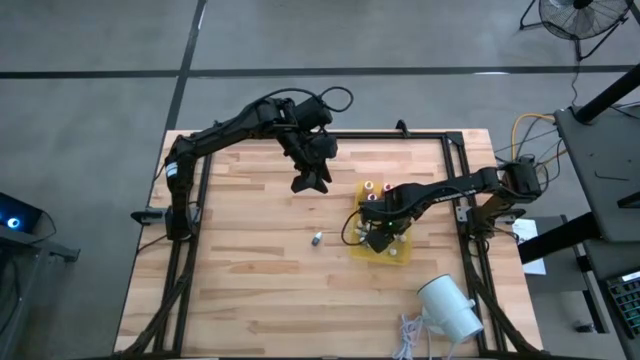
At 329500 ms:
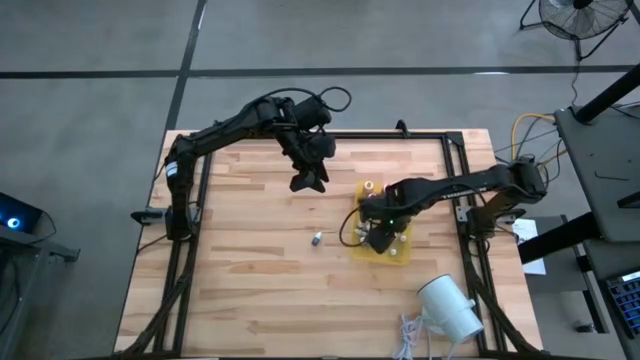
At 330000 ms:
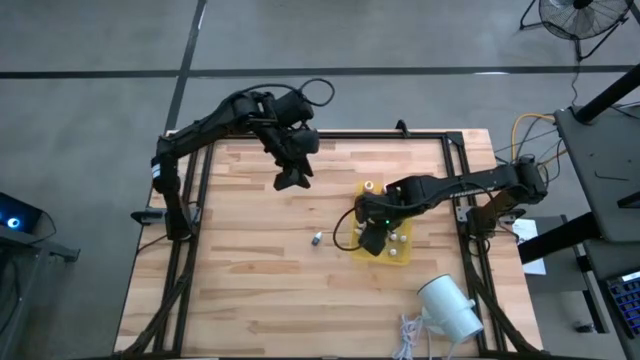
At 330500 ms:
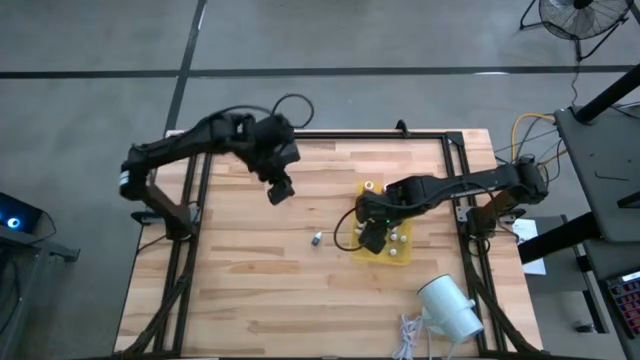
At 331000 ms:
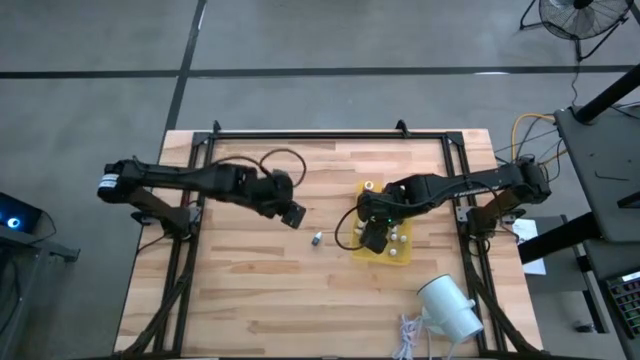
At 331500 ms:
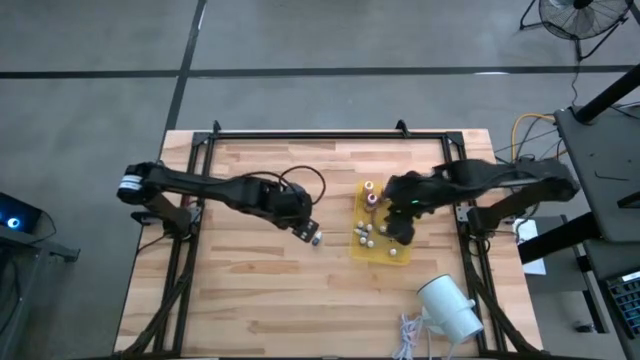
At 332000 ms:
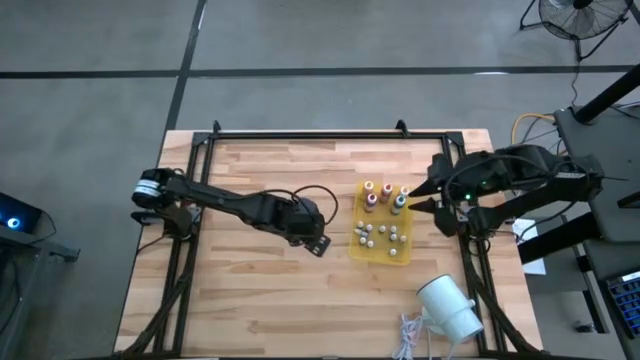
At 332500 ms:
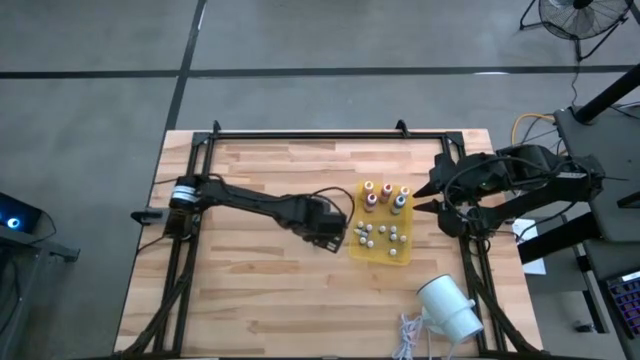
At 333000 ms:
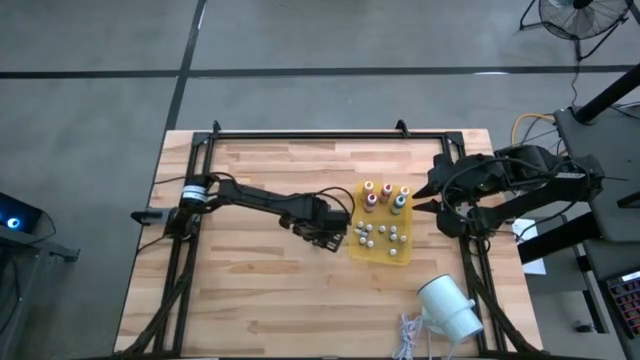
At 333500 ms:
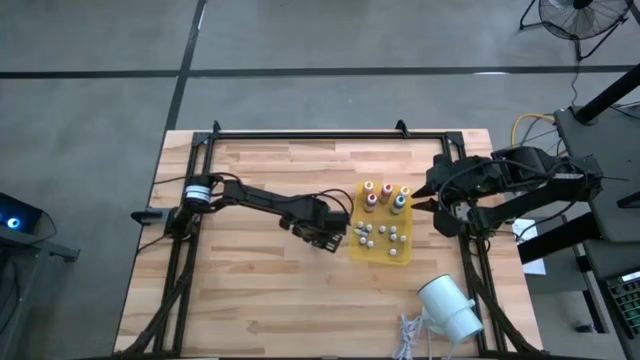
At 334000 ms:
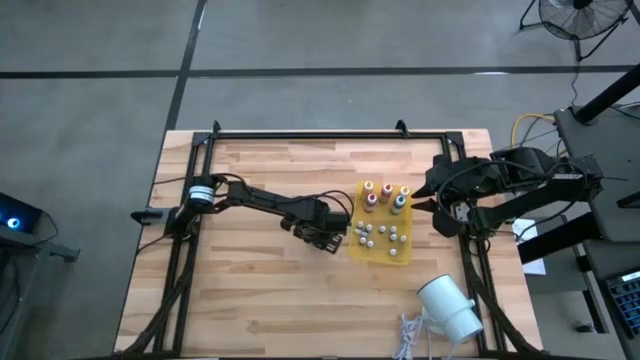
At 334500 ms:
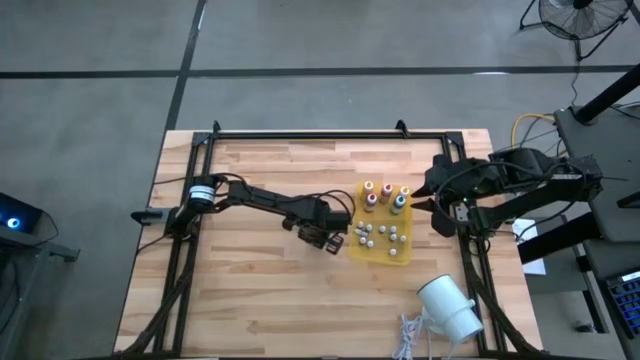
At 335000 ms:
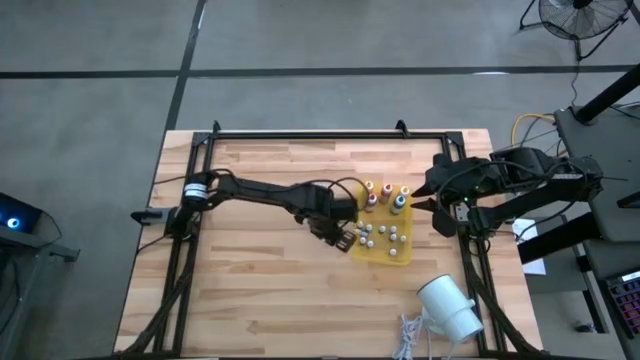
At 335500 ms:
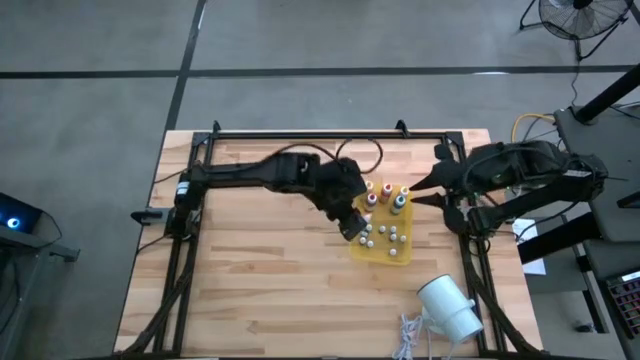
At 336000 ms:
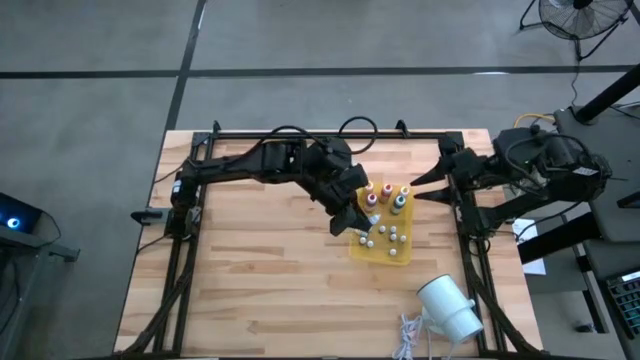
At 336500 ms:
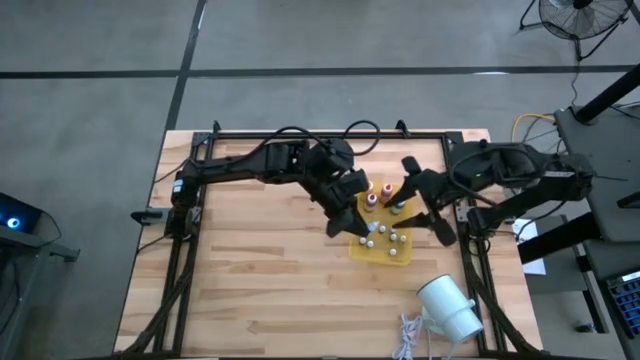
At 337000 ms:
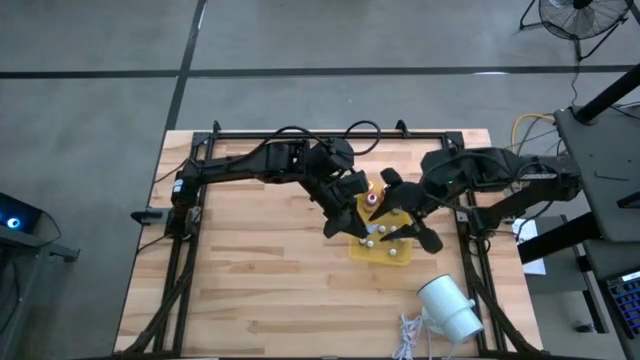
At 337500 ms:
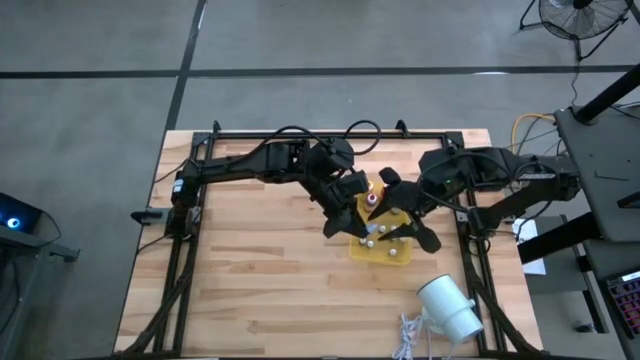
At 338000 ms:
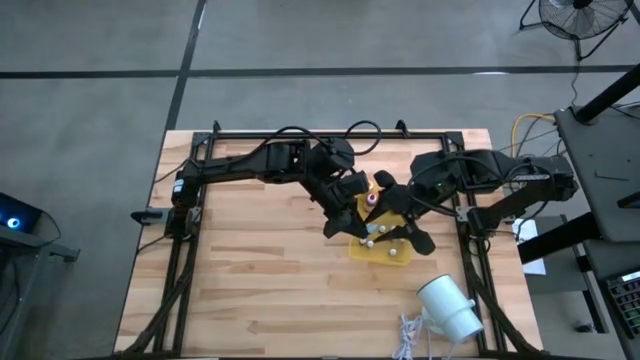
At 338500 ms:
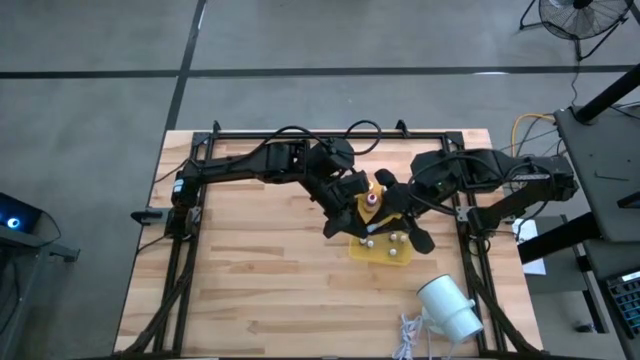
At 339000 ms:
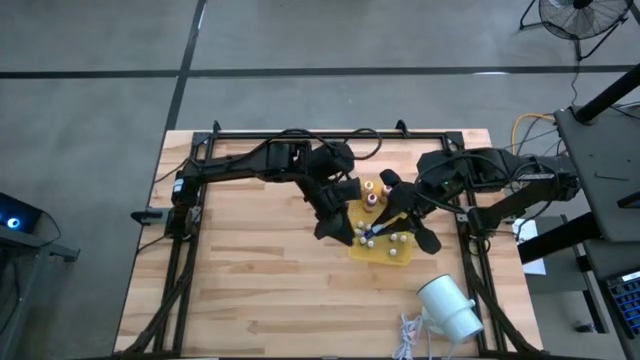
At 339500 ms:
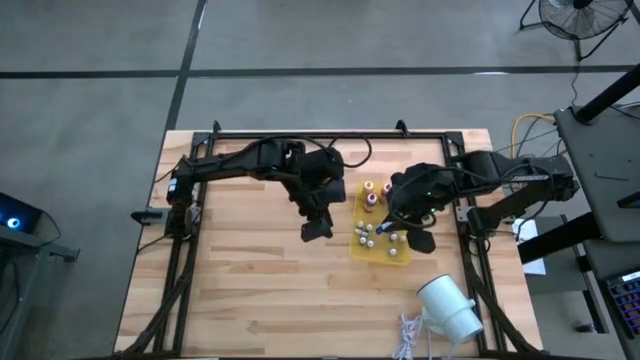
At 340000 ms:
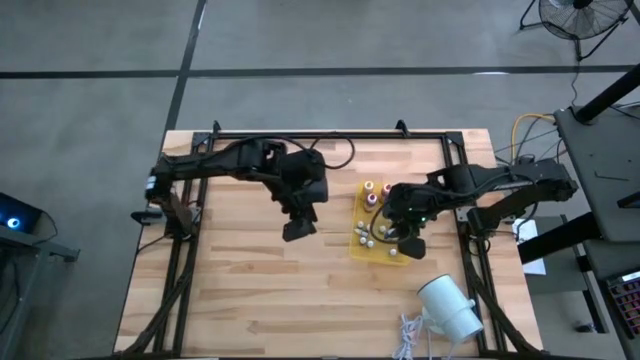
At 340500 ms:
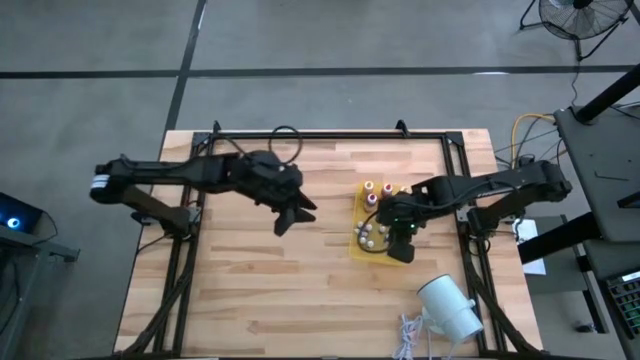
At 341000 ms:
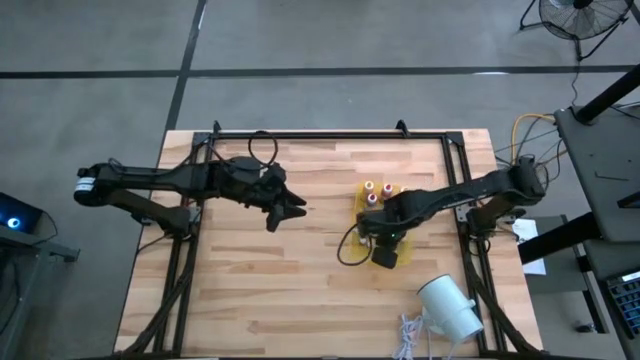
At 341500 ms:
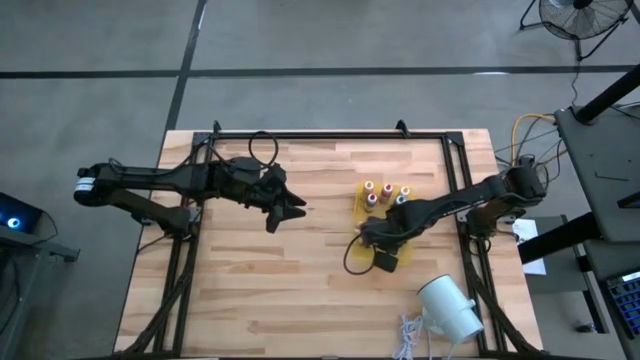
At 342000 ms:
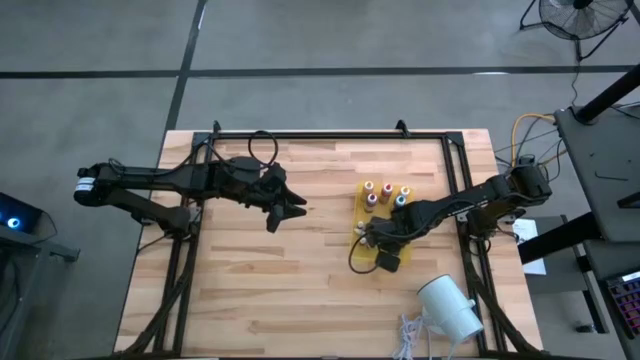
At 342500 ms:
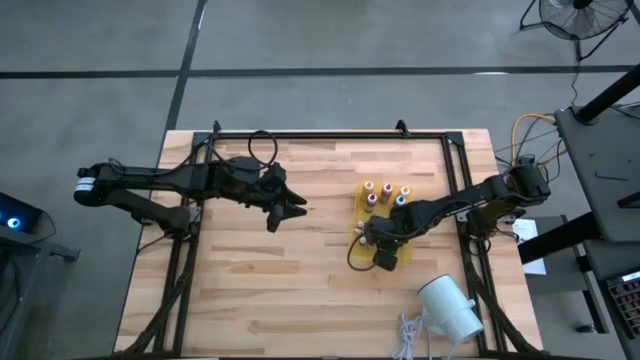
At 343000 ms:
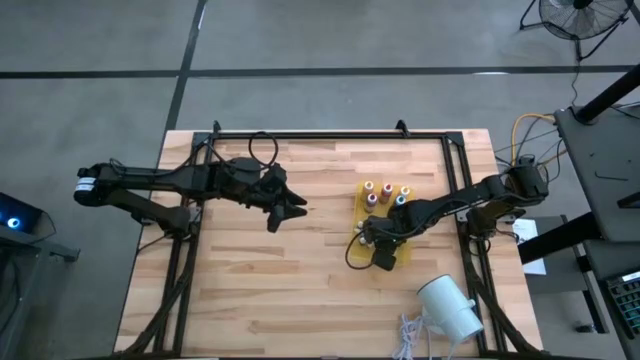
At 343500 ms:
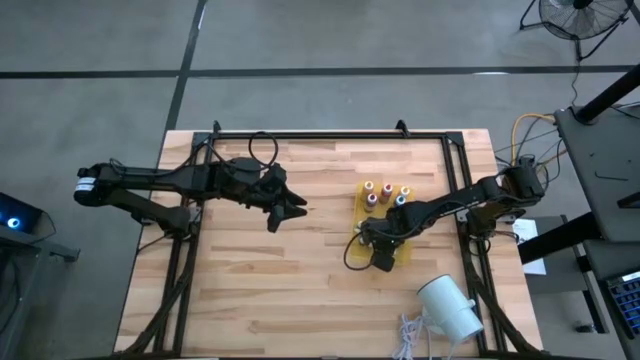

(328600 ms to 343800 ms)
Task: Pick & Place food coloring
Put the small dark blue food coloring bottle into the yellow bin

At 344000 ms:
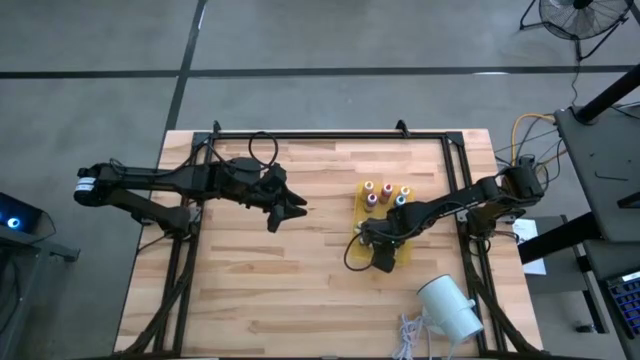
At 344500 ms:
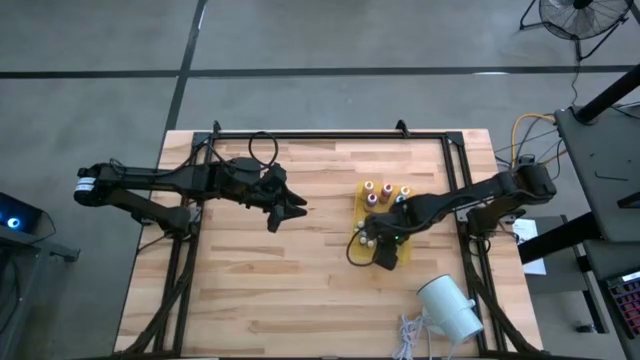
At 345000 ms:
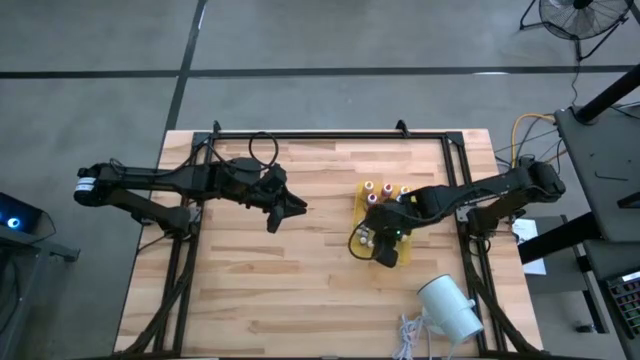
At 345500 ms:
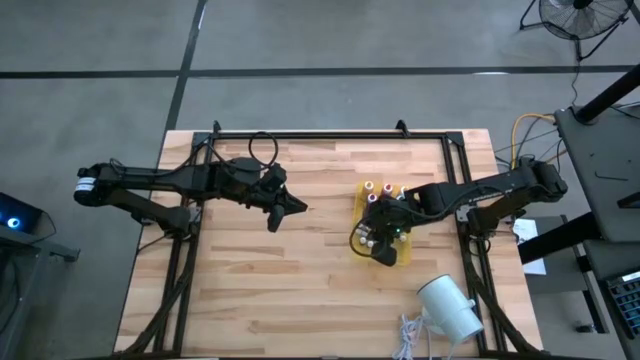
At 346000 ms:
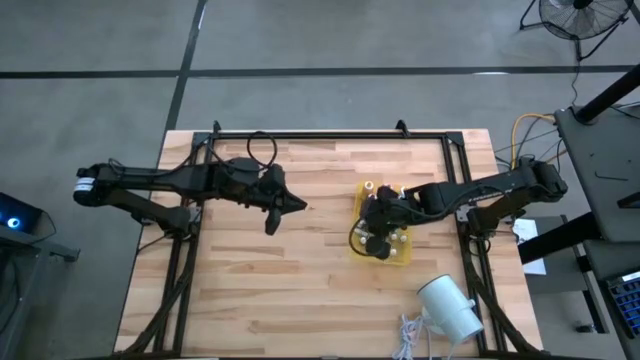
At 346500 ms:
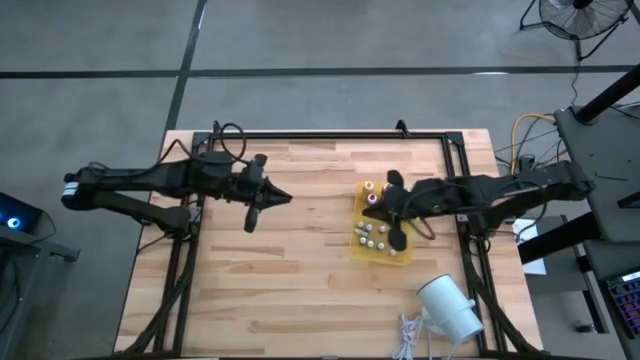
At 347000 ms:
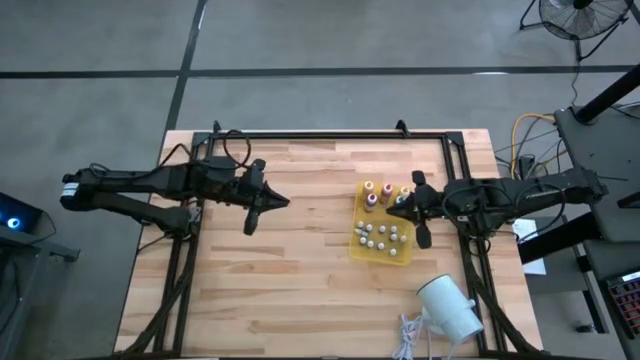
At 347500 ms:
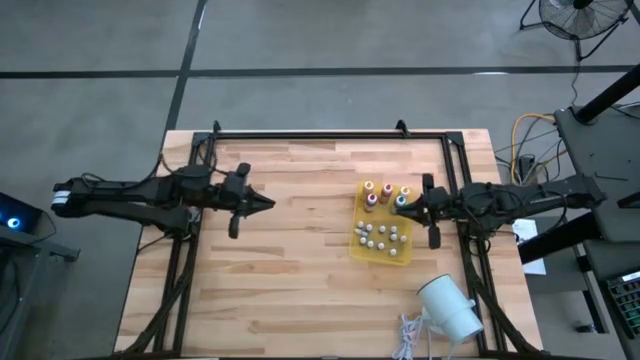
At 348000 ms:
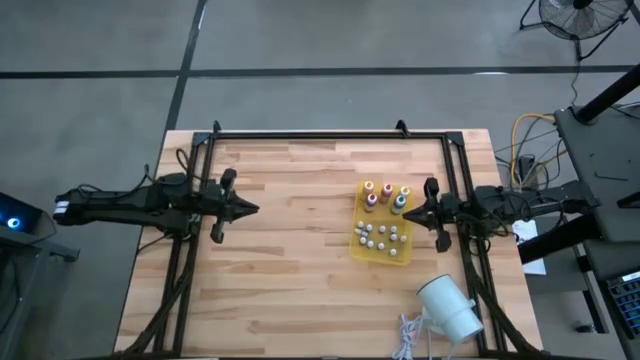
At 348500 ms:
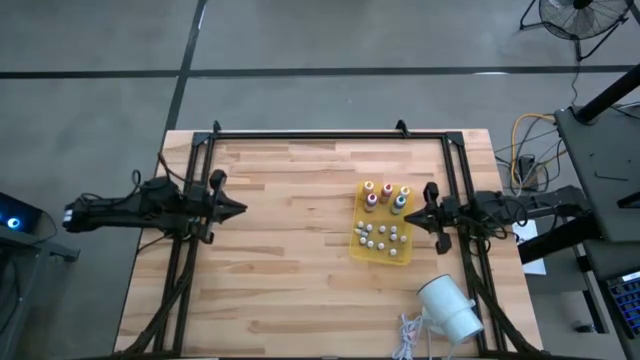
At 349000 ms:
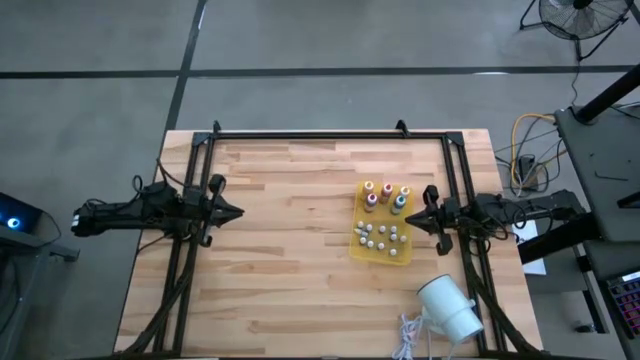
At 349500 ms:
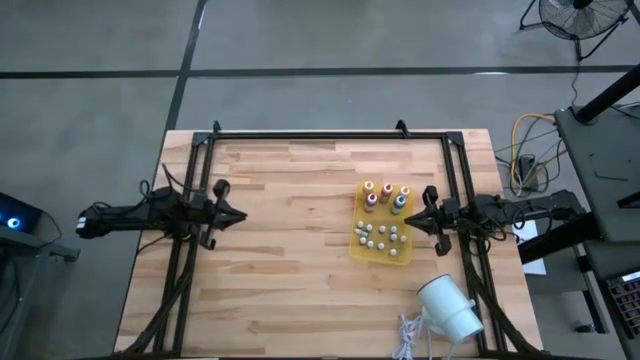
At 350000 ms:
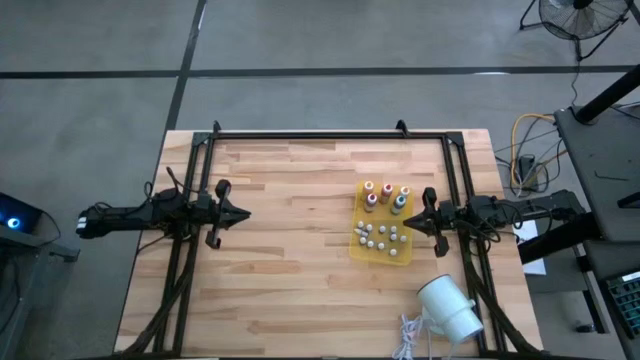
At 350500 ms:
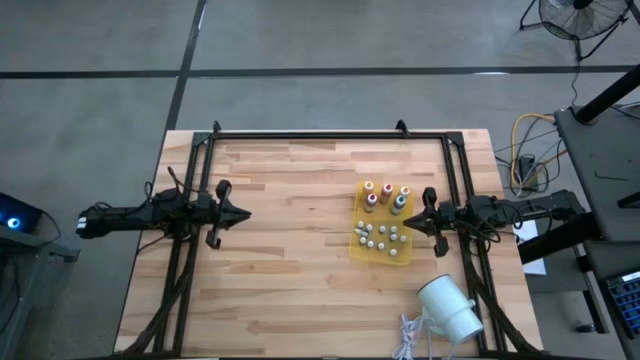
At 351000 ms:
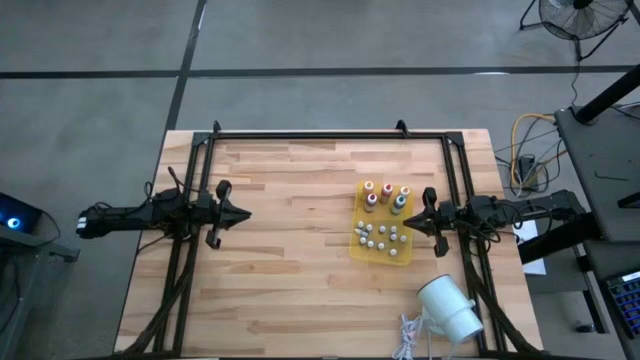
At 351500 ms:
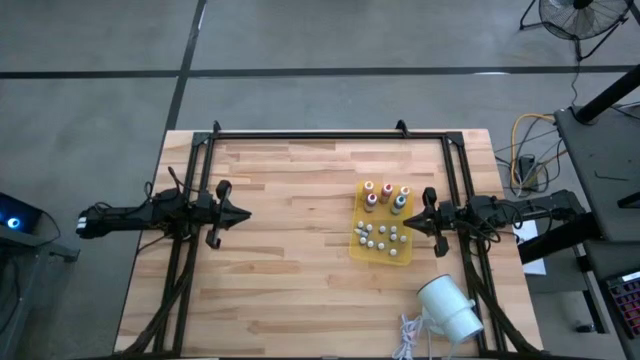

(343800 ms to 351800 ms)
Return to Home Position
